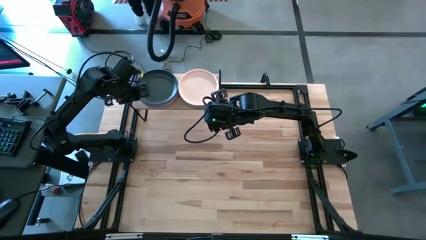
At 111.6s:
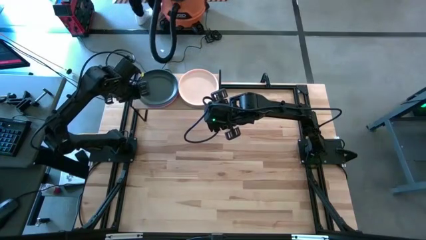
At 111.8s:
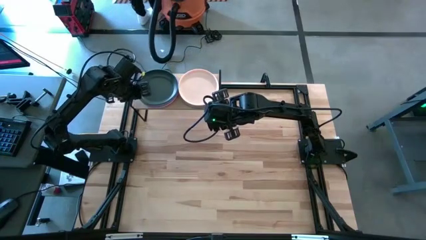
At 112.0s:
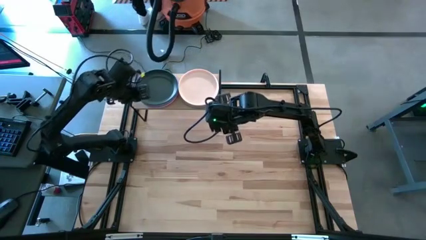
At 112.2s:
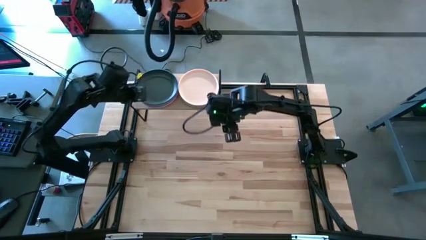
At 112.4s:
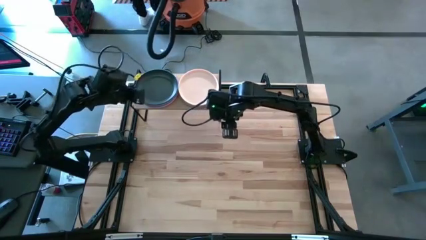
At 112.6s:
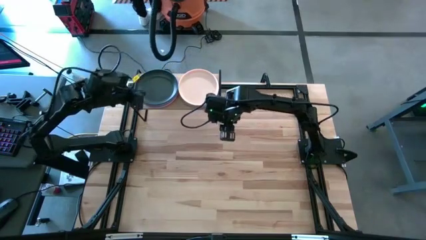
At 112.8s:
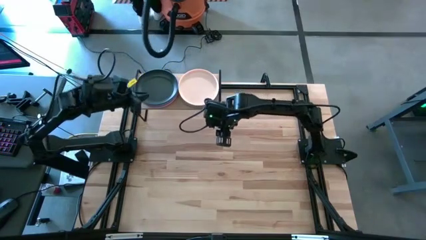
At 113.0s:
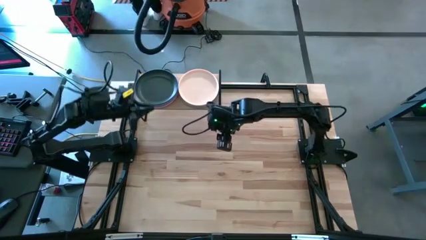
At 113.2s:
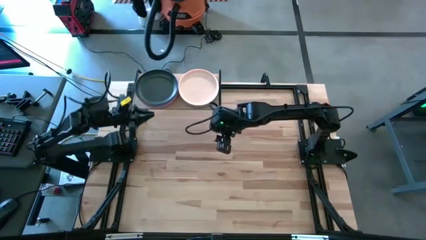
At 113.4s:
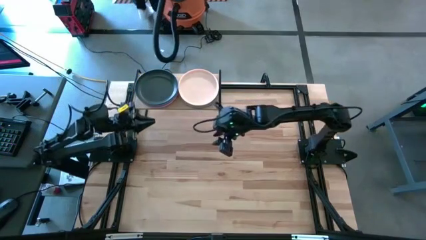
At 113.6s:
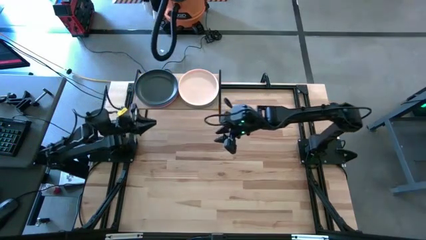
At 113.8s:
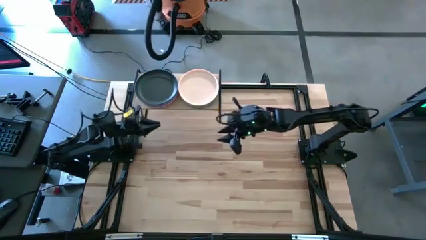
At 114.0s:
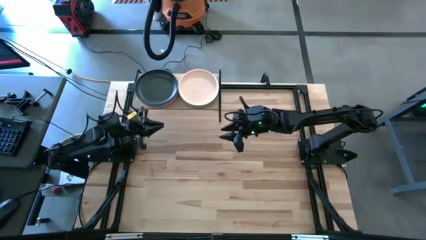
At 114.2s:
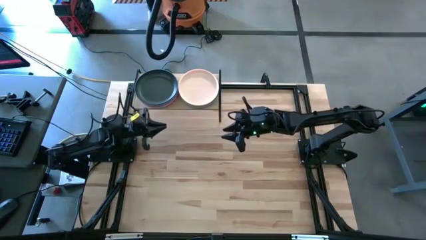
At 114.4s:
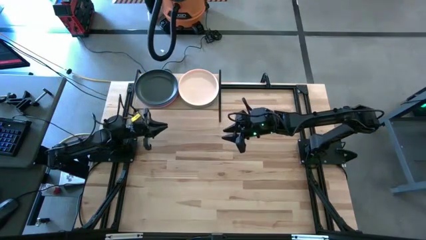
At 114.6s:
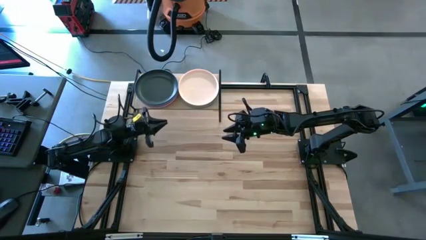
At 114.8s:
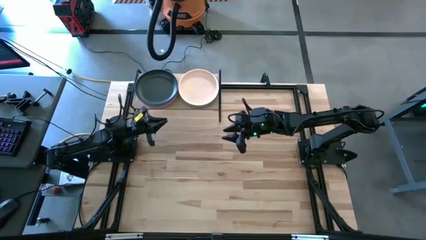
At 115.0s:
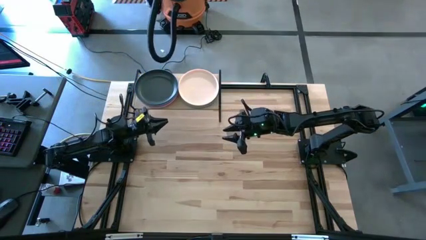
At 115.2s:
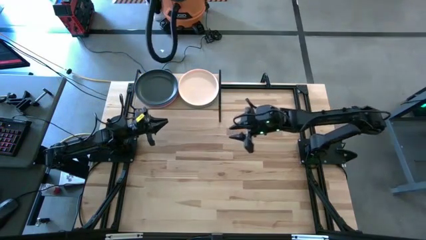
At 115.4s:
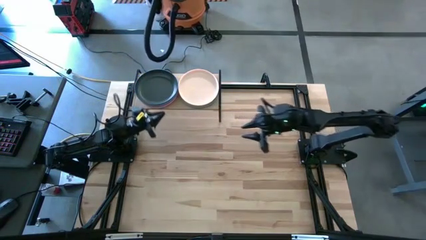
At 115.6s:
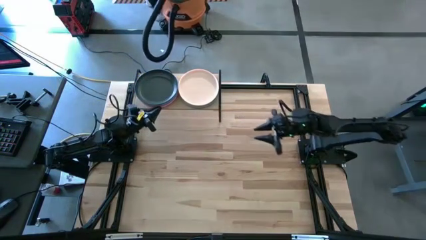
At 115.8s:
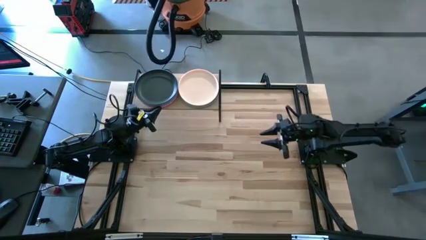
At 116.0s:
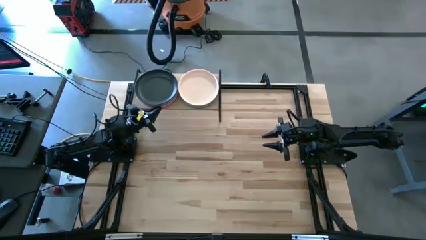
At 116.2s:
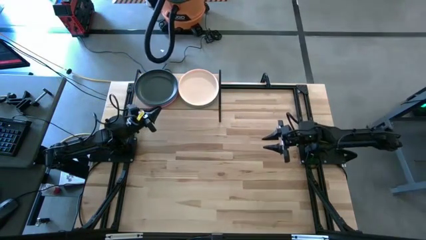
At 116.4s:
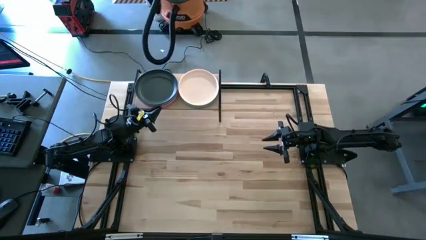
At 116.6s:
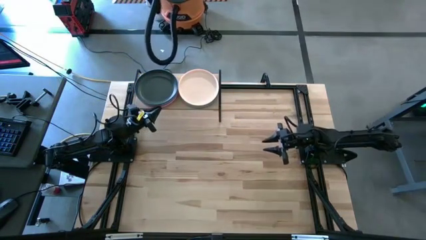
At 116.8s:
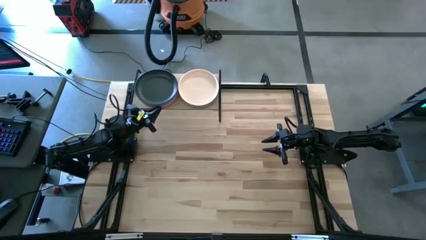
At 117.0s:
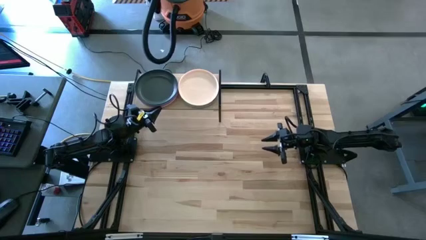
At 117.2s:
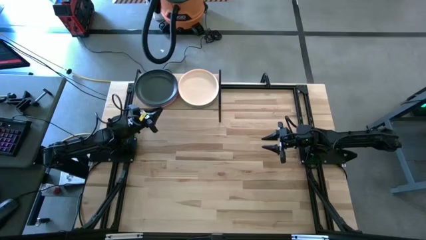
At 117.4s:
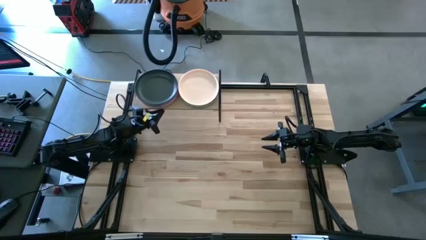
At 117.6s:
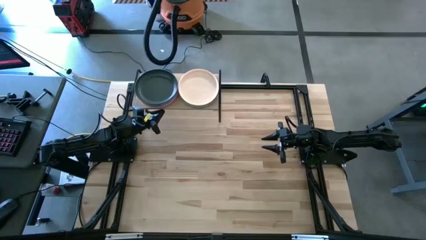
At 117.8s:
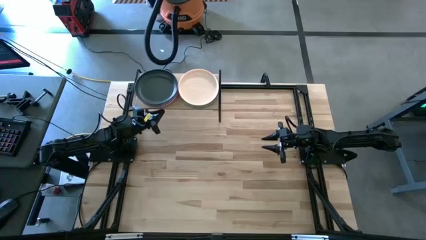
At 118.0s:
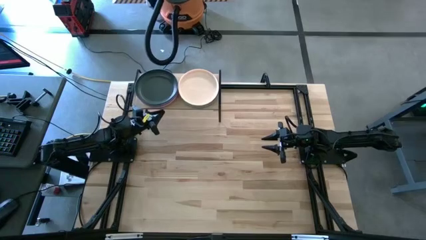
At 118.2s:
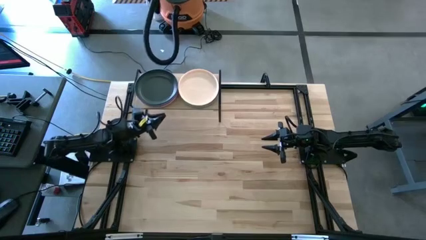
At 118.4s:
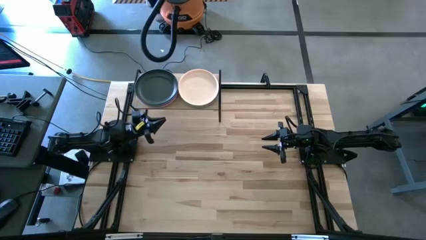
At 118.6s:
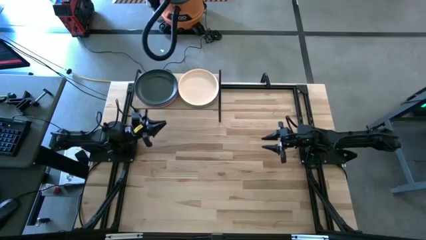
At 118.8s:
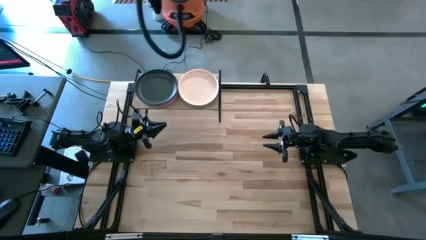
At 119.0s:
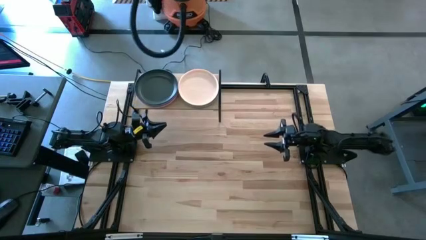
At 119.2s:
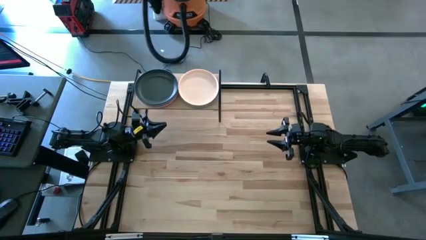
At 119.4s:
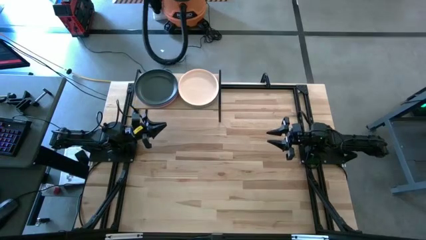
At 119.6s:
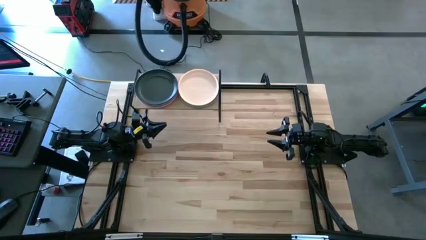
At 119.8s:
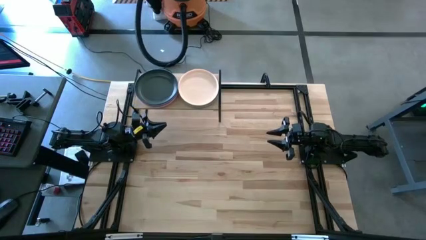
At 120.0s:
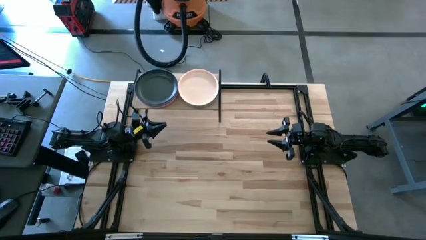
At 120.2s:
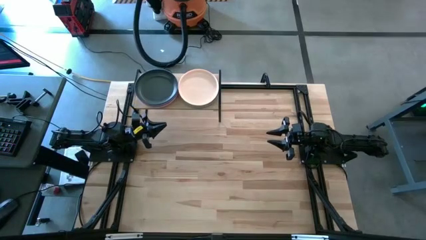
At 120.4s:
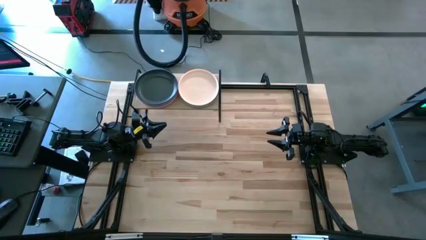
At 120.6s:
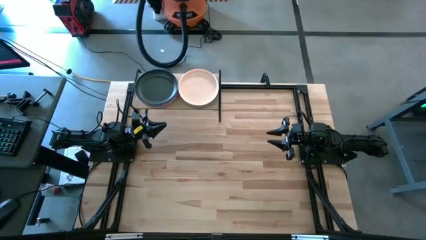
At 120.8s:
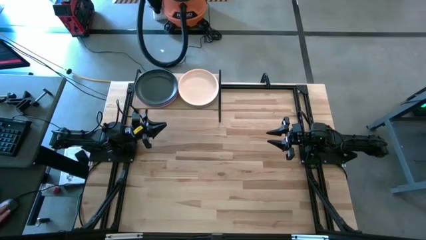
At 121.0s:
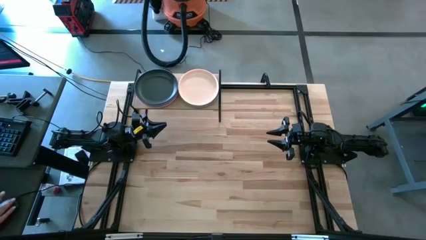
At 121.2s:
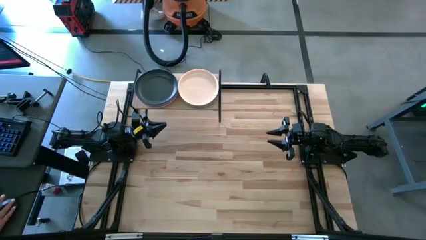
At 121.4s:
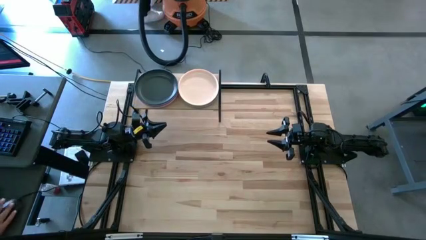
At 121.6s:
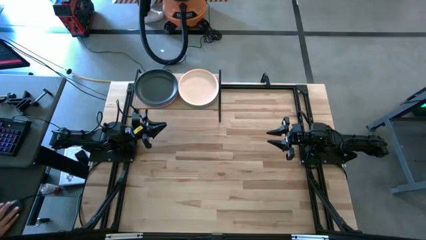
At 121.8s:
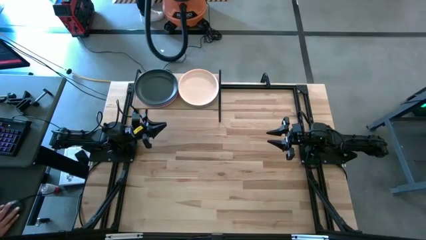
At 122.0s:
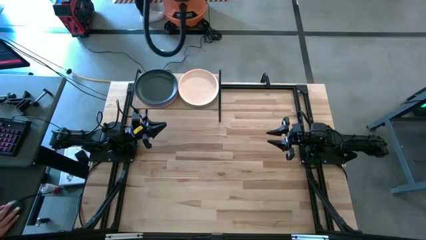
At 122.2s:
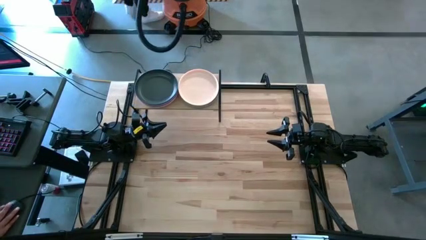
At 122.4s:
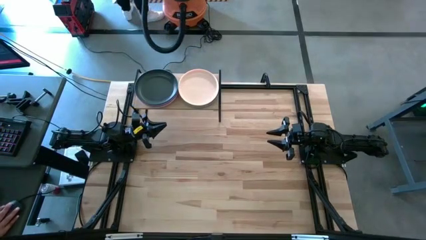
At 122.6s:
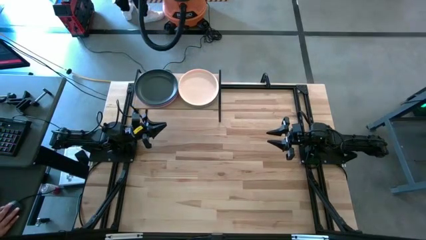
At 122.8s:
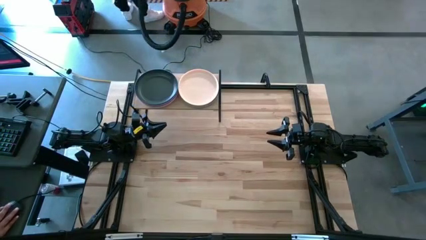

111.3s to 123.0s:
Task: Place and stack plates onto a shelf
Return to Home Position
